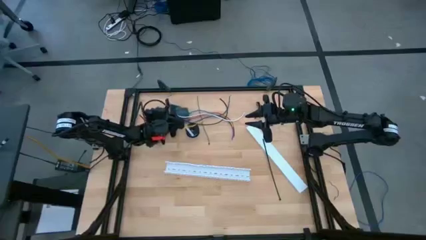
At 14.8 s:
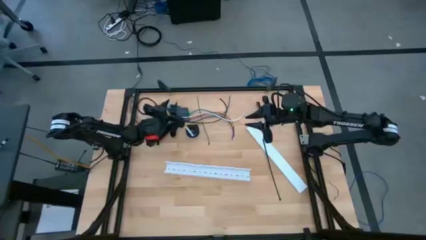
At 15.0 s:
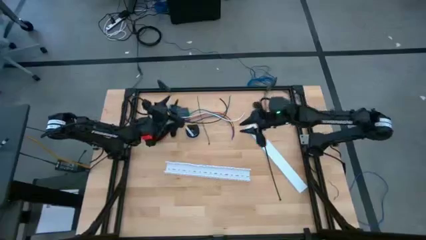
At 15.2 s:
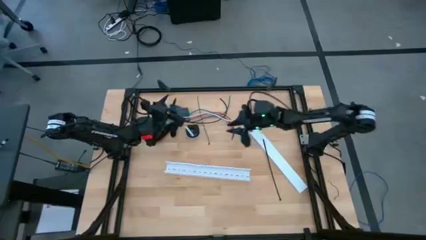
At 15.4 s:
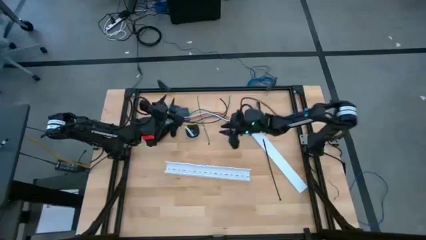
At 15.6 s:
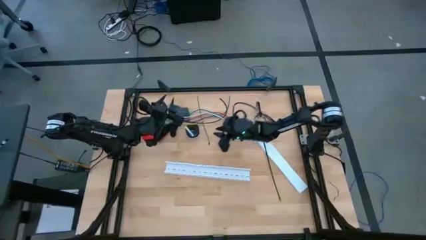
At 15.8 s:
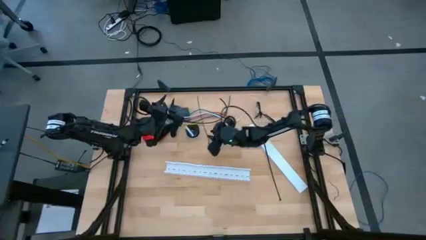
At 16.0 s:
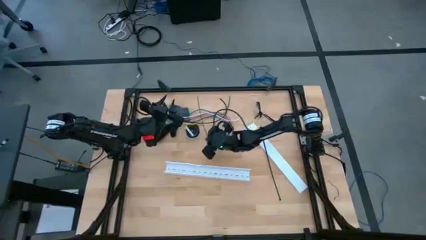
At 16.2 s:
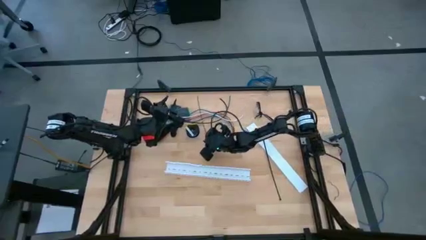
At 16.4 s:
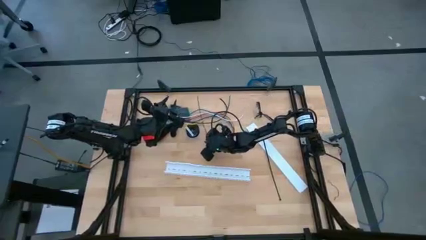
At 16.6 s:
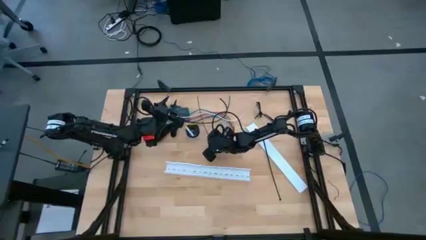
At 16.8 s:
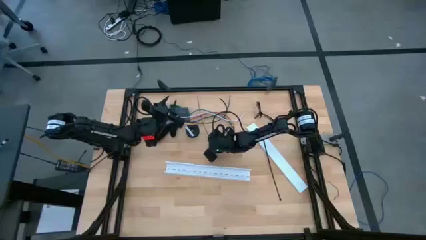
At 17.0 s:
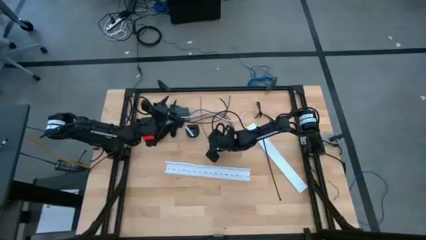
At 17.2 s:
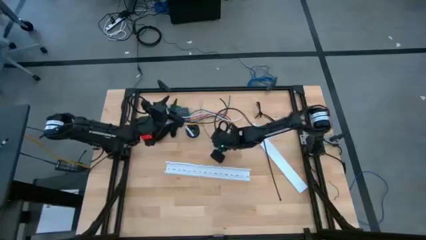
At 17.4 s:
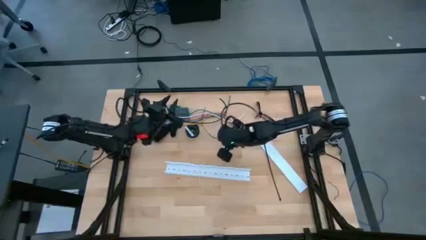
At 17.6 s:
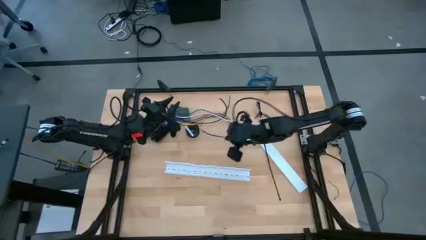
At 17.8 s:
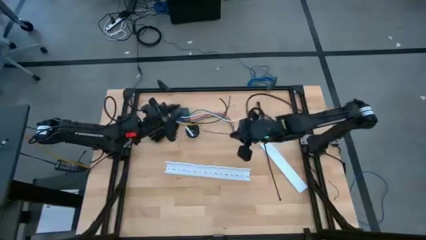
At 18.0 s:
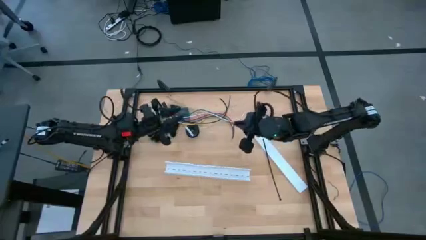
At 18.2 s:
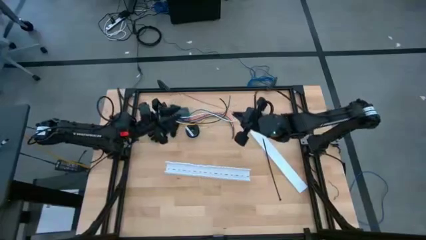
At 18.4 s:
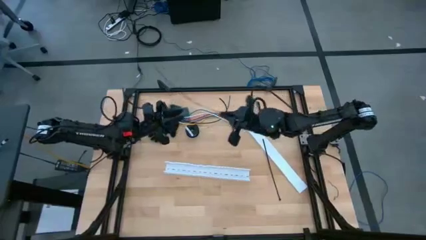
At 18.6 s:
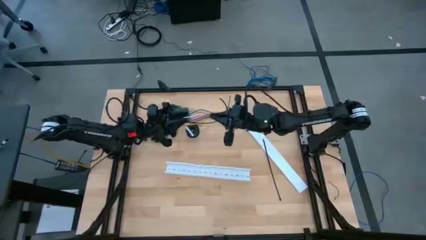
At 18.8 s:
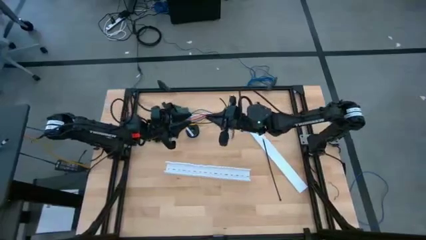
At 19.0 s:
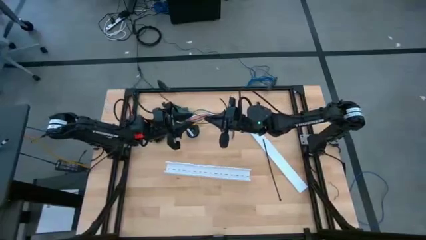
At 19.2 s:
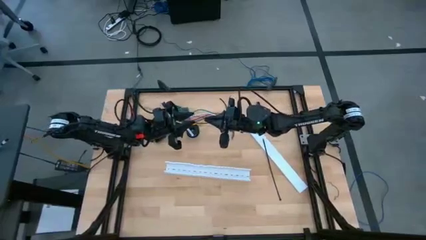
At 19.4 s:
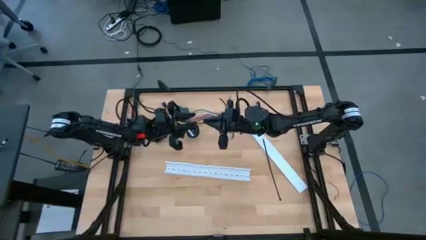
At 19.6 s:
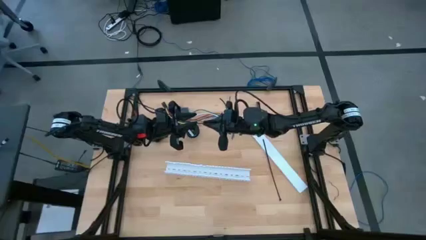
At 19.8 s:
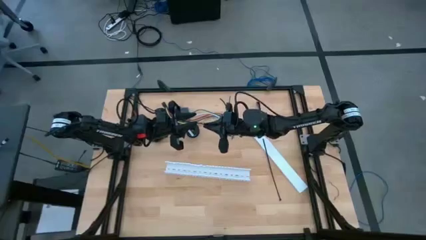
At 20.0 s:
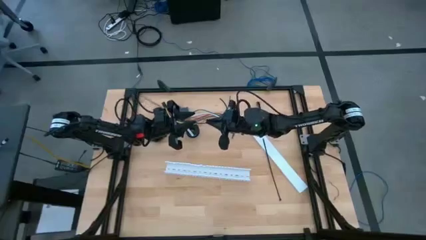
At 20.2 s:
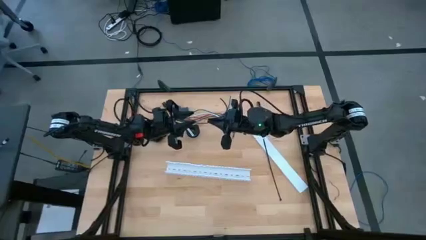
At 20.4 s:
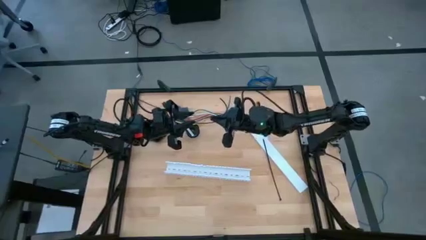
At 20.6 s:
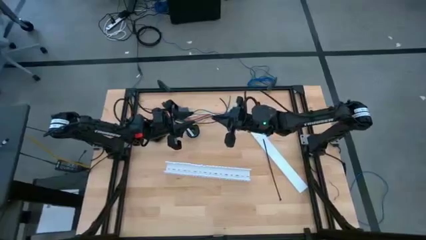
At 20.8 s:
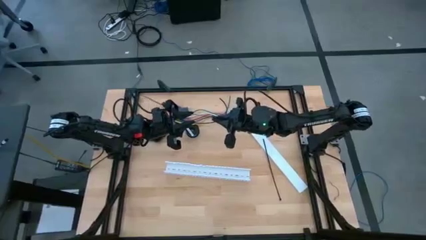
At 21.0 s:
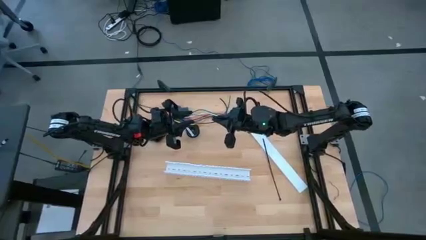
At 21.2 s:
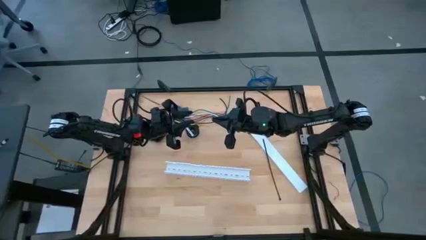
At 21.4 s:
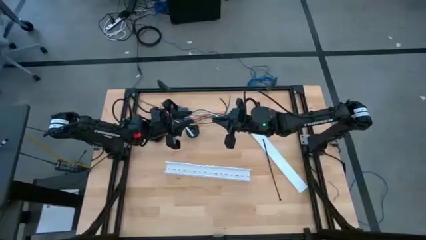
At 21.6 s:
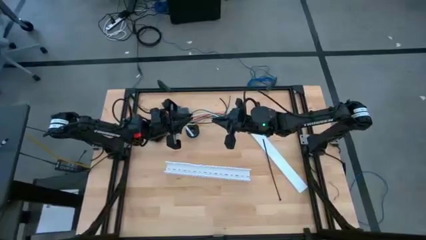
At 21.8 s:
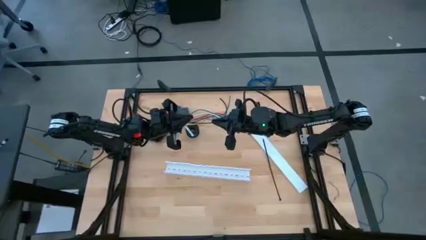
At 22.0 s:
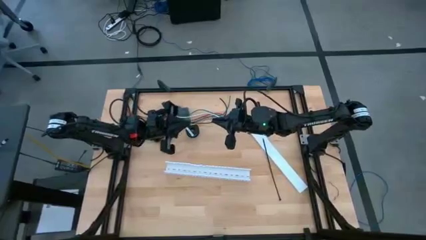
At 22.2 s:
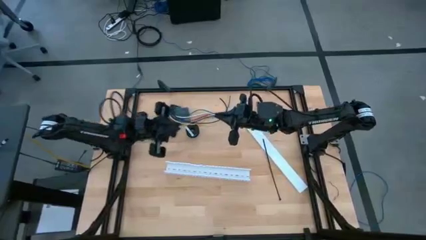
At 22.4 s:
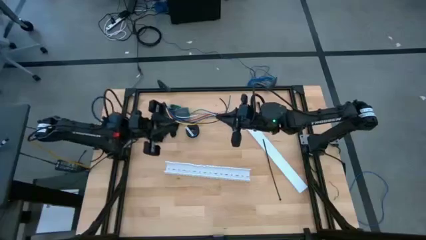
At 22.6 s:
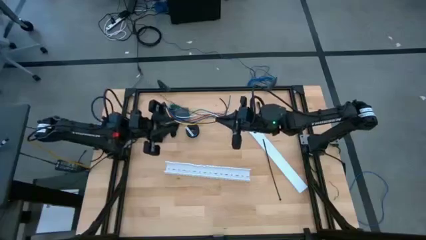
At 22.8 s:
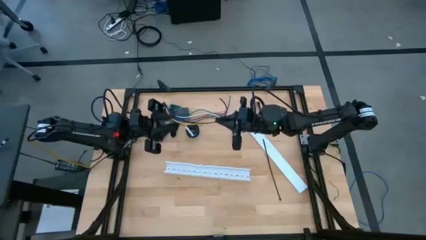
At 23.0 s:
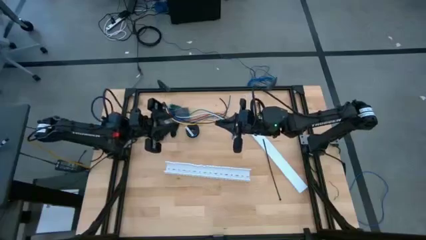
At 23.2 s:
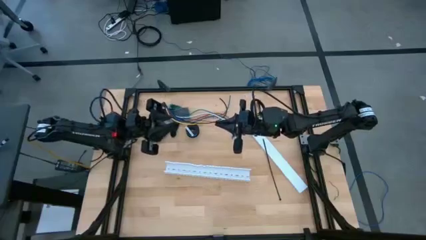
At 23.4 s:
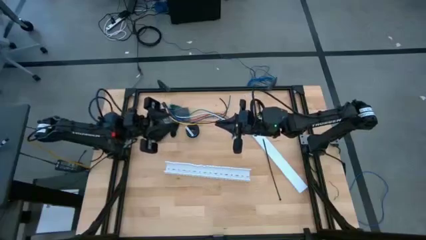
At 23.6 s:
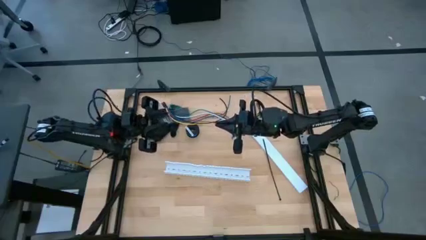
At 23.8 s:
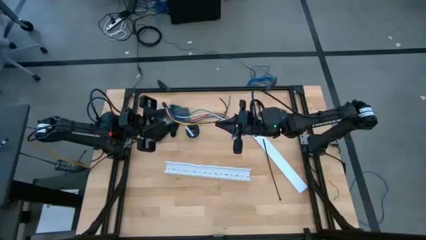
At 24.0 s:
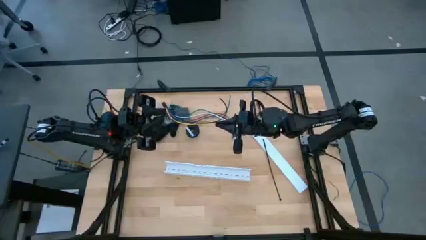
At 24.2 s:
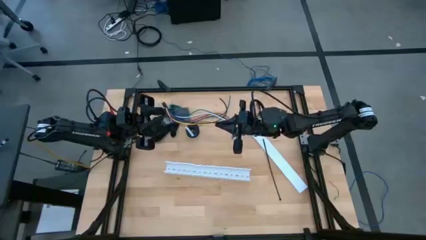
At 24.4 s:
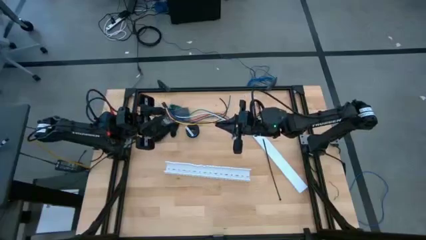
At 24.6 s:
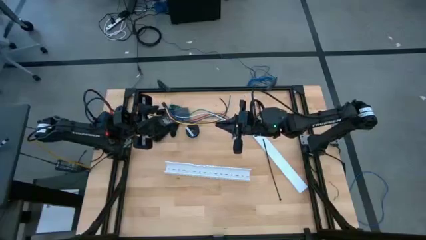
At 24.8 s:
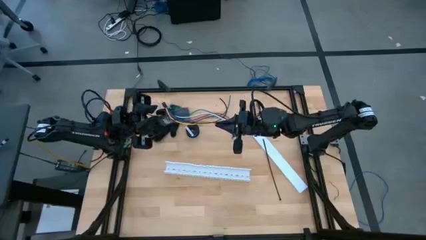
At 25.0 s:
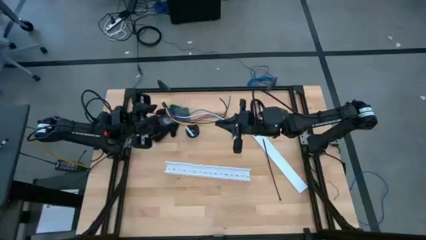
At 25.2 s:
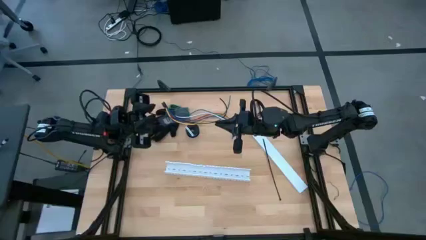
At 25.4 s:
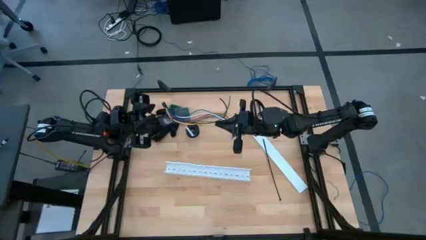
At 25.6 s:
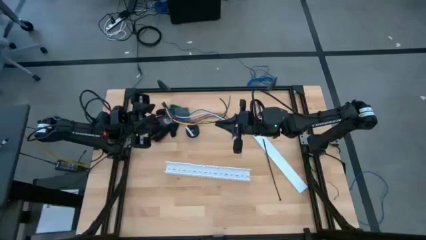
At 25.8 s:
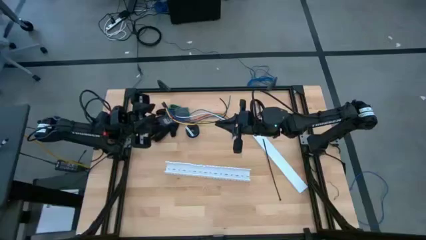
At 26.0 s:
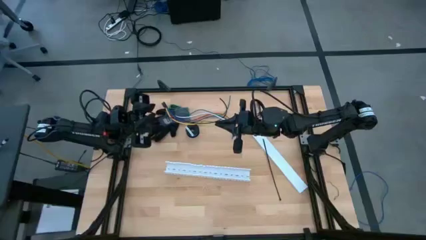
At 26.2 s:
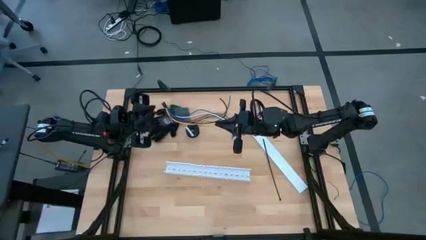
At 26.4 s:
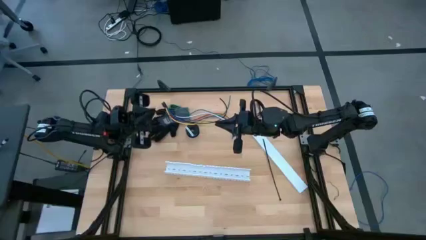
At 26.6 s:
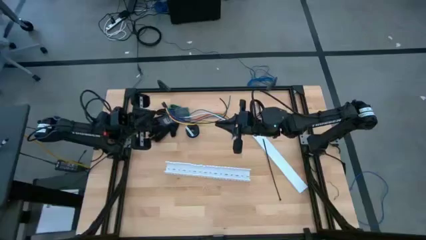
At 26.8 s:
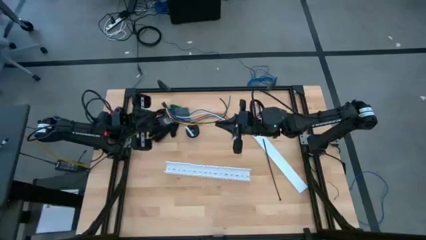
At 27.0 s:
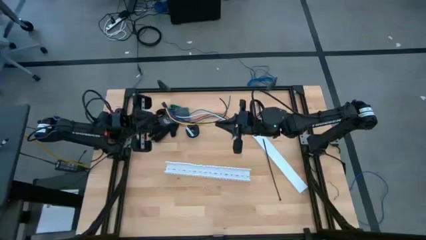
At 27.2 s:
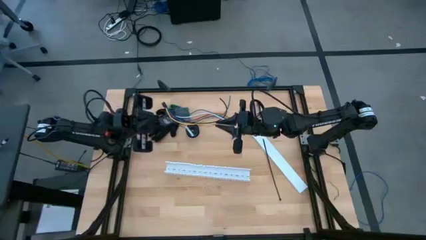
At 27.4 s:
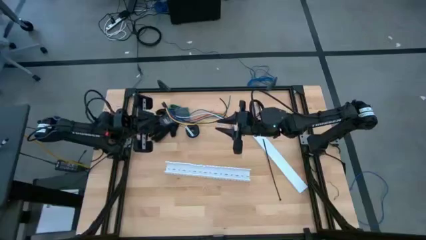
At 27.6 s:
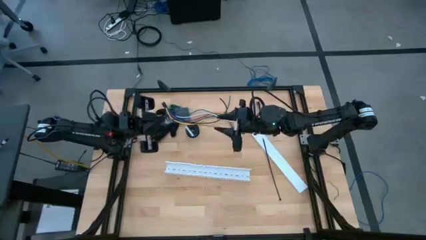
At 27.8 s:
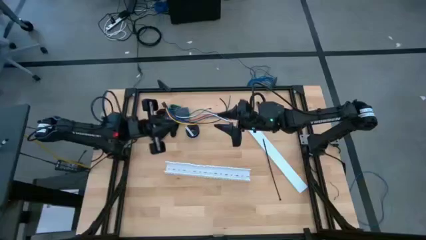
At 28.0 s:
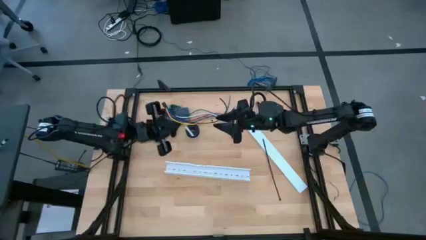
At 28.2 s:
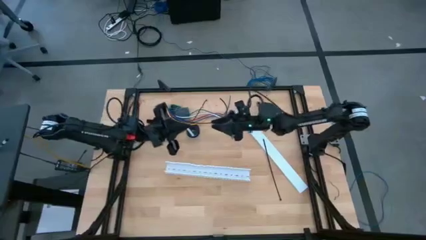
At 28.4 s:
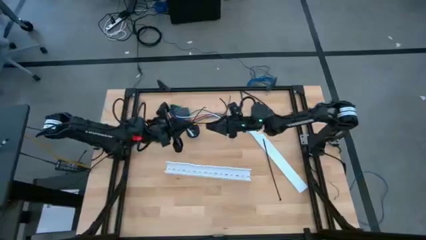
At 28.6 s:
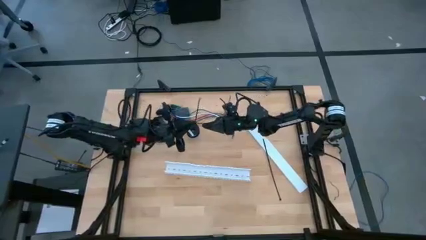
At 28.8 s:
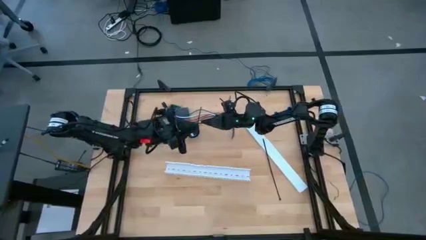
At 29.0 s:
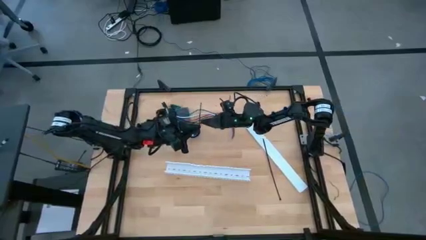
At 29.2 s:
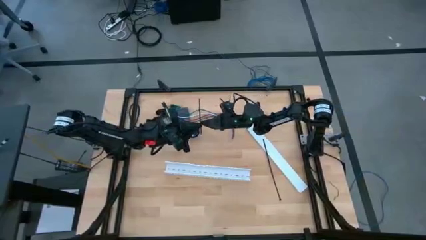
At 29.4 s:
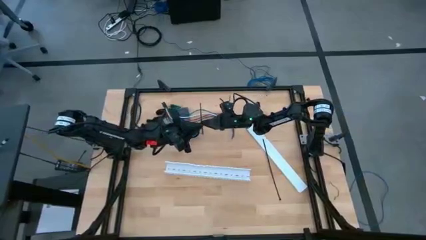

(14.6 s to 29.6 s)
Task: Ziptie cables
Wrap the cable wires with the black zip tie
